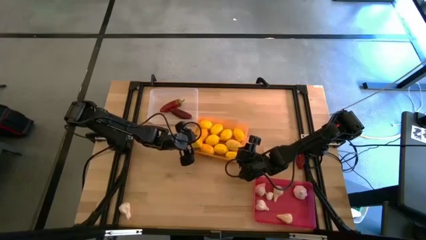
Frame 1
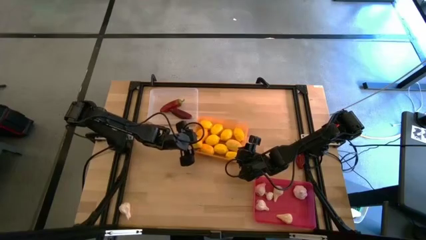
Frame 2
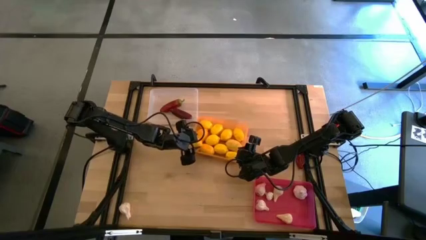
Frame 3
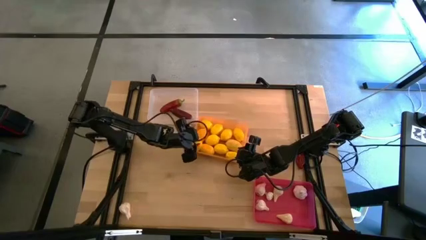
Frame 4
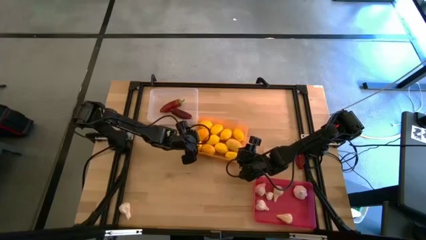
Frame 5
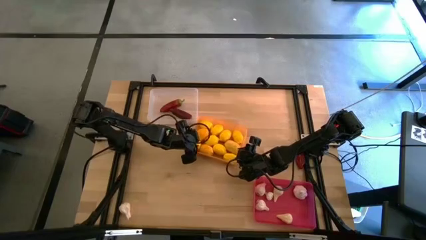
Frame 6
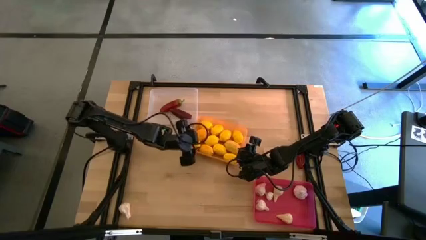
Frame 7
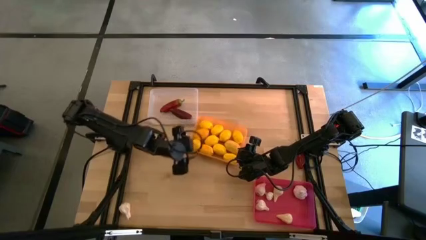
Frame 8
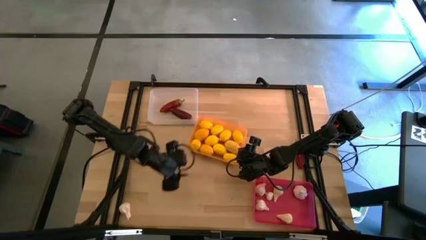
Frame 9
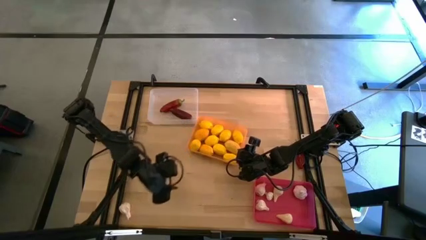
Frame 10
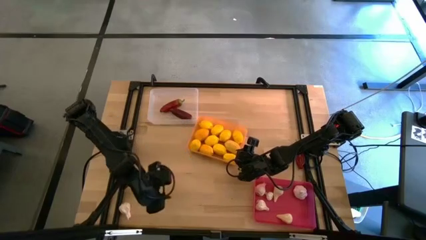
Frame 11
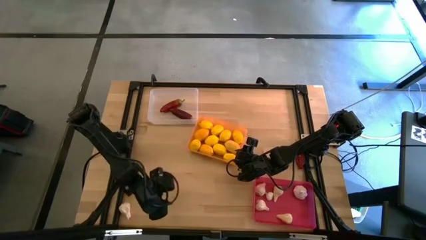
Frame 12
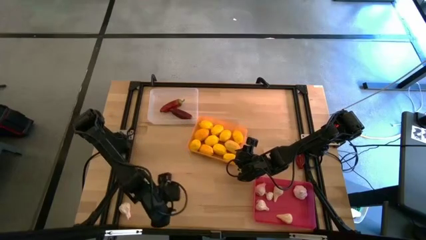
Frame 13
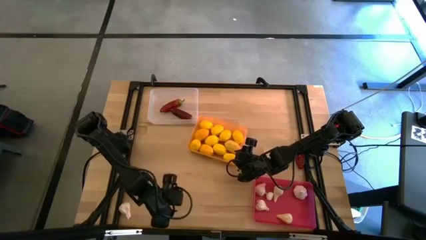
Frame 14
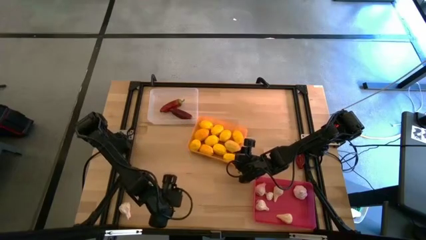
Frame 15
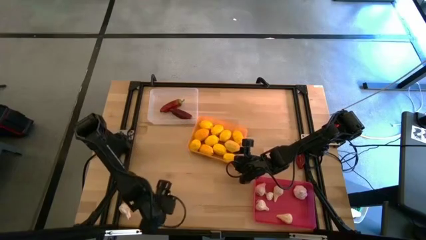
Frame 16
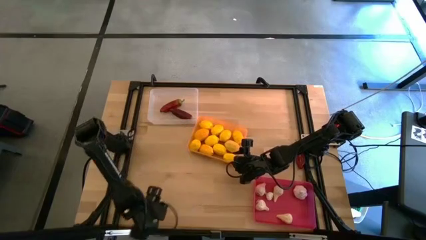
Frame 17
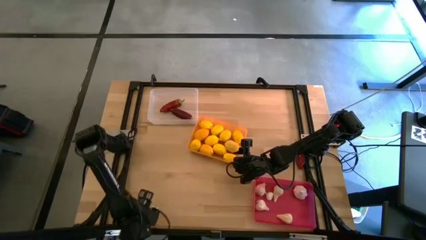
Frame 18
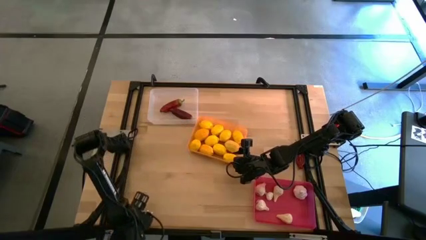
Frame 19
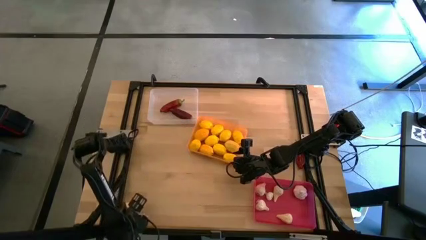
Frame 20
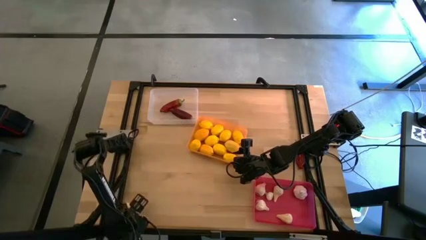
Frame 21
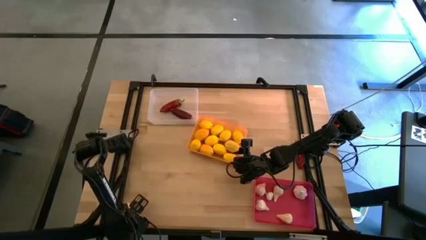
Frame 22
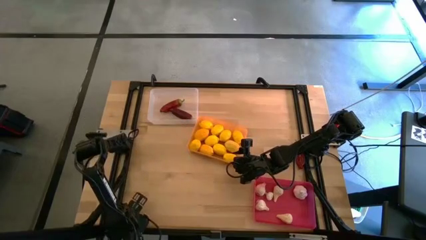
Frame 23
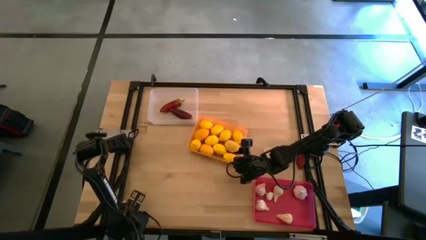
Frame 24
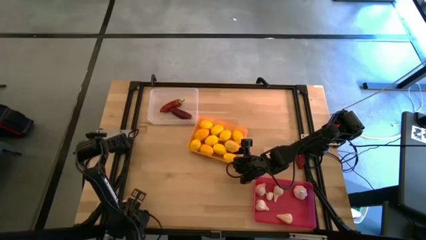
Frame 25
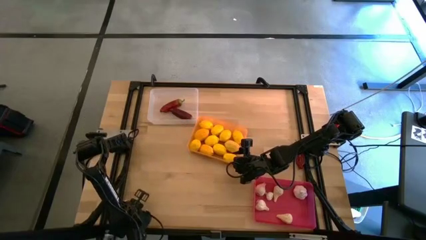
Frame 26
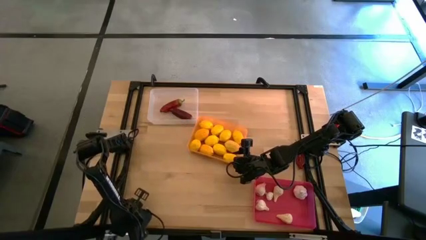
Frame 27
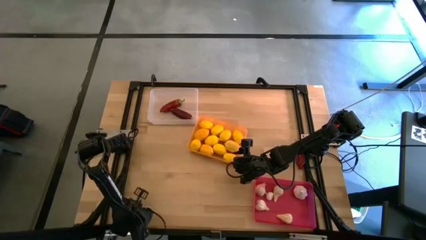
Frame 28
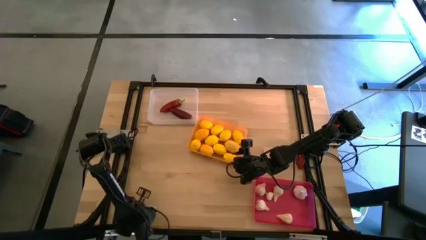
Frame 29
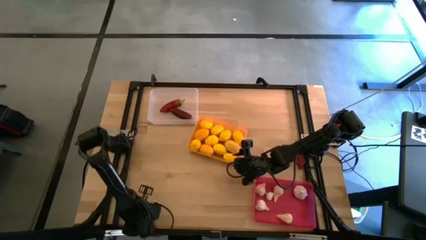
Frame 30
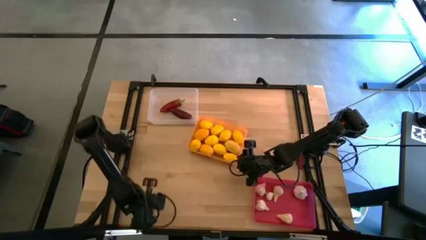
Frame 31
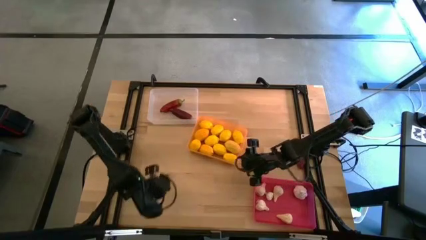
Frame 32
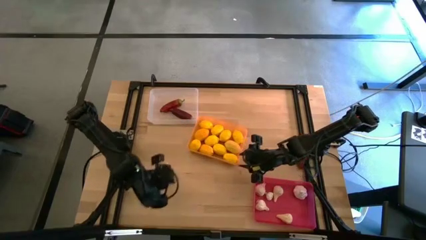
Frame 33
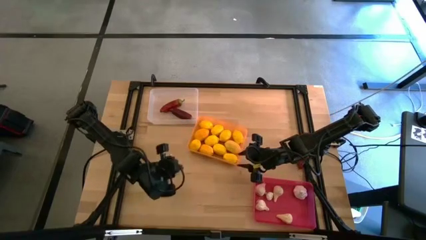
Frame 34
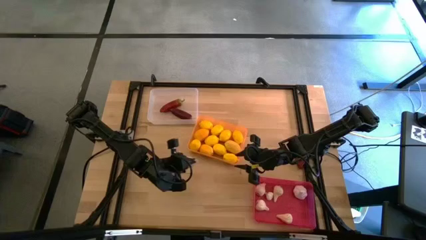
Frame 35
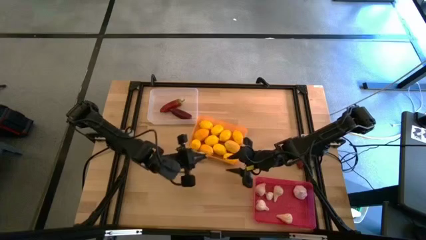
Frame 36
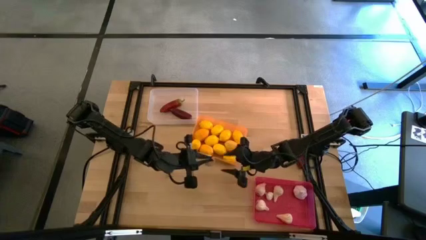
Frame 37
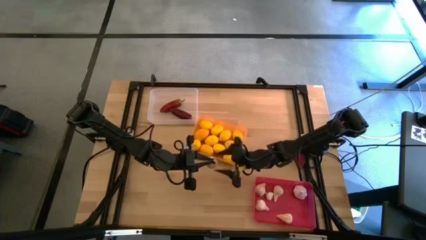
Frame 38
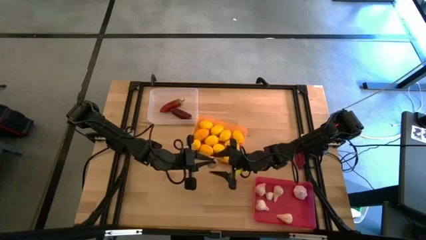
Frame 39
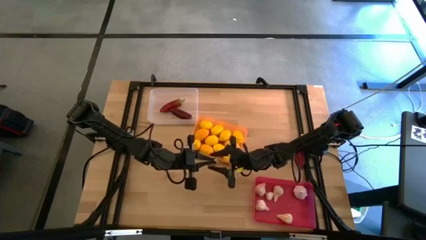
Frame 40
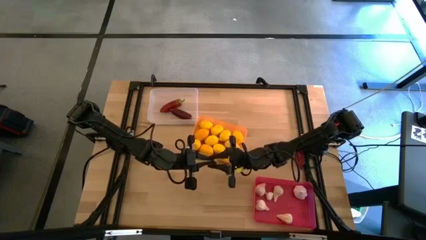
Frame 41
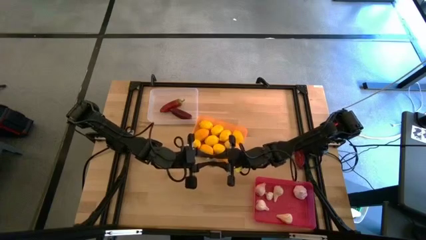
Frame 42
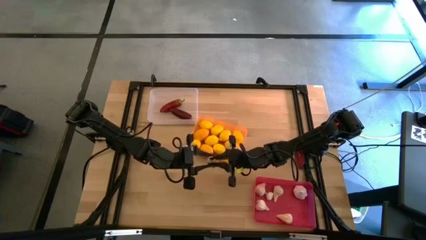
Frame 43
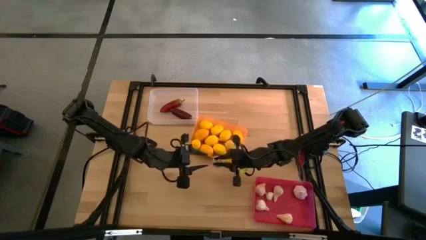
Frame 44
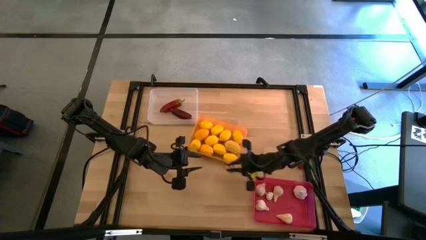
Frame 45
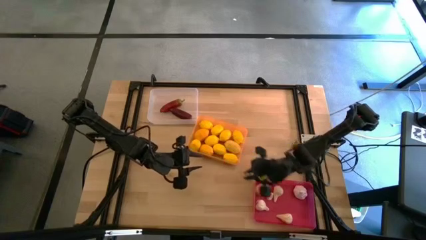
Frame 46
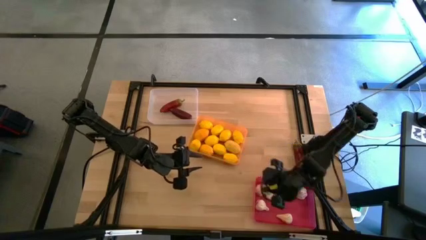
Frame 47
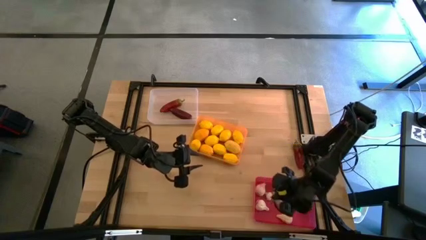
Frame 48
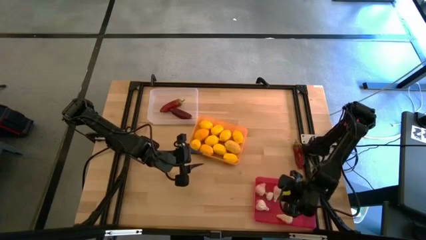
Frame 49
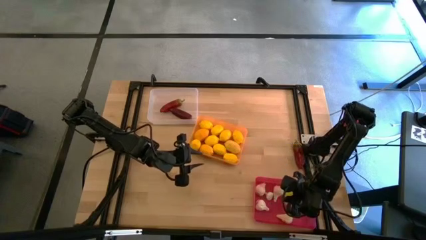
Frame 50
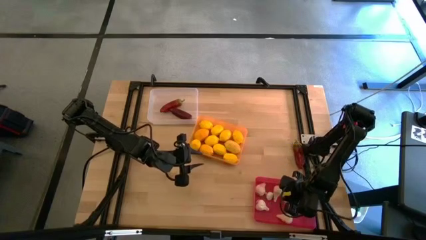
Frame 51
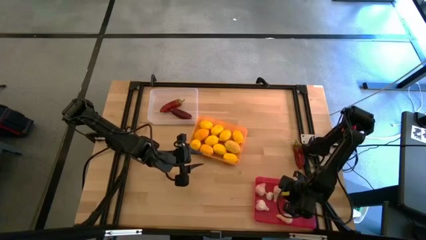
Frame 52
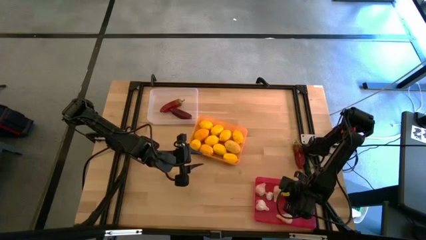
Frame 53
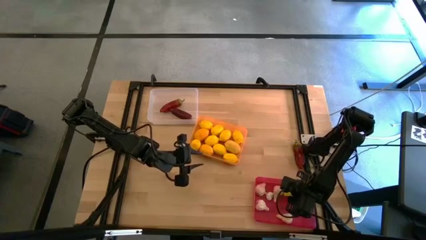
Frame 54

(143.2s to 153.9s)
Task: Sort produce into baskets
Put the garlic into the red bin
